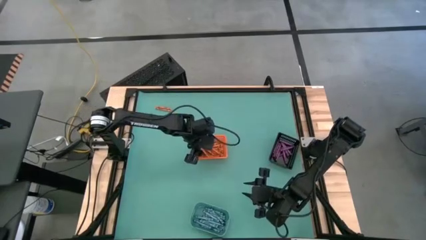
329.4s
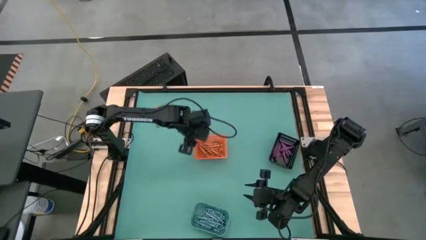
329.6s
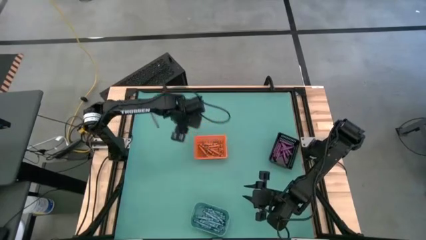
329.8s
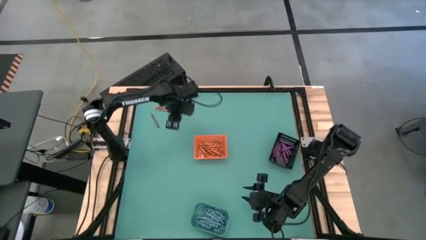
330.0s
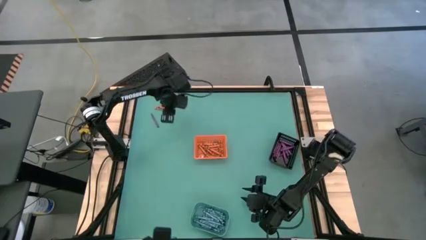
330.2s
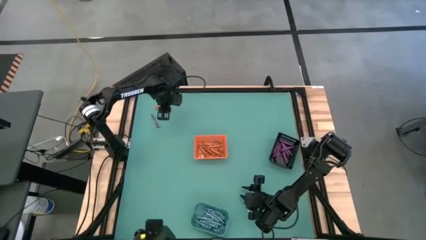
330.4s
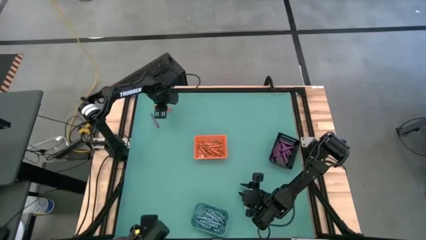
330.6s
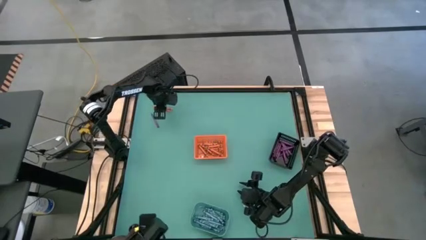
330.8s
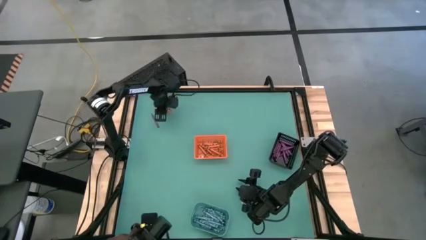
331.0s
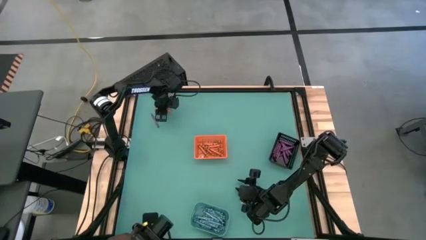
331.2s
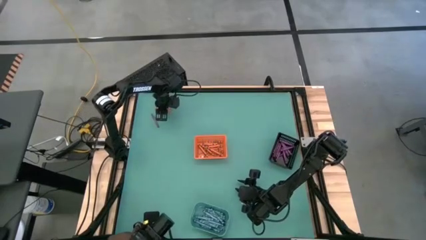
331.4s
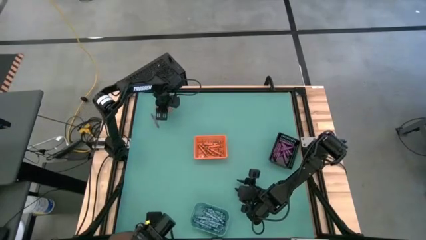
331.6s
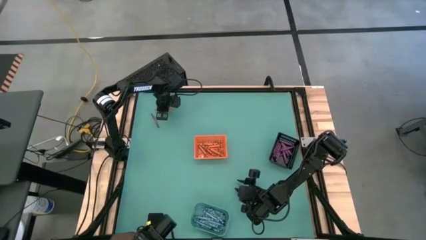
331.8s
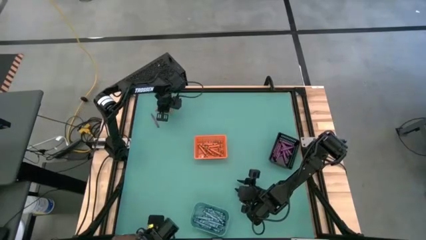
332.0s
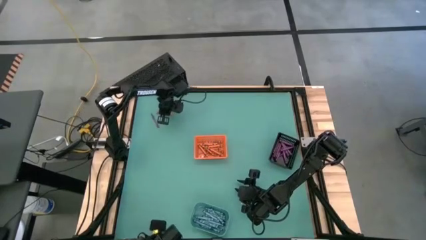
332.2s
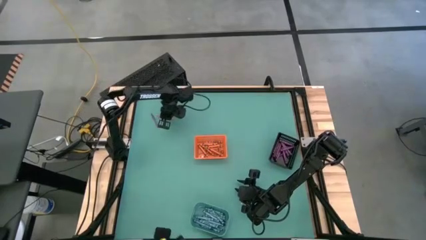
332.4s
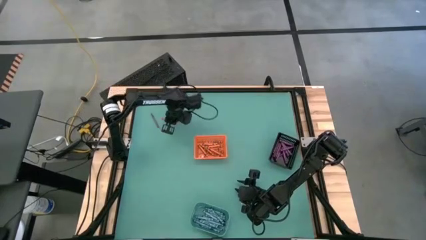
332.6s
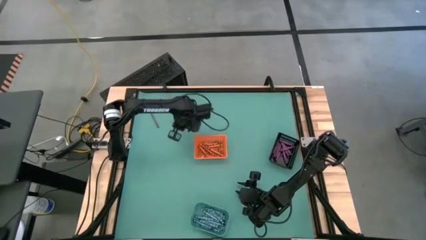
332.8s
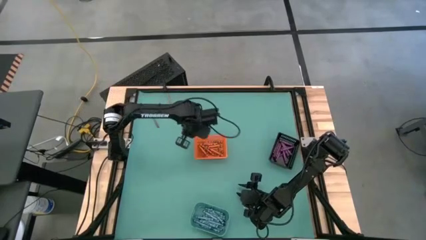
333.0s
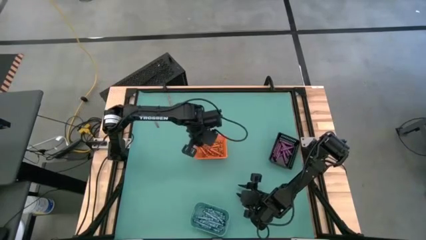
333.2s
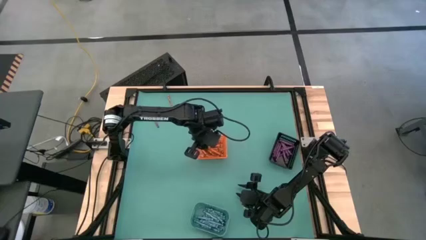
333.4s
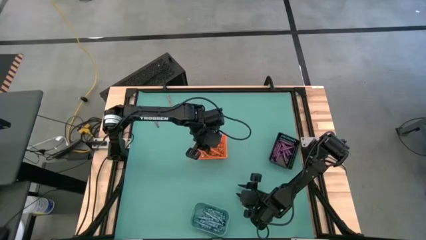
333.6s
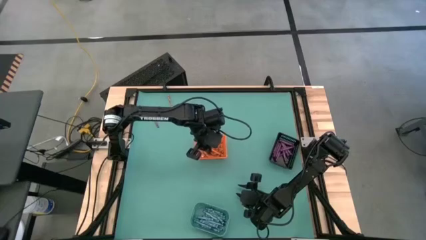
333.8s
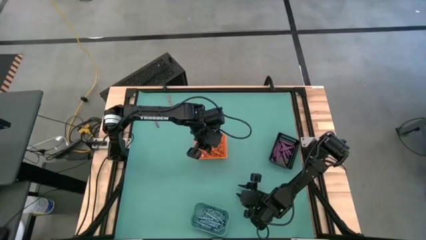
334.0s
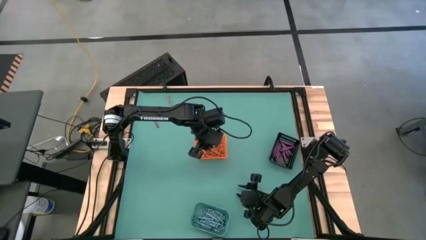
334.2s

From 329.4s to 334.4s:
Task: Sort crayons
Put the orange crayon into the orange bin

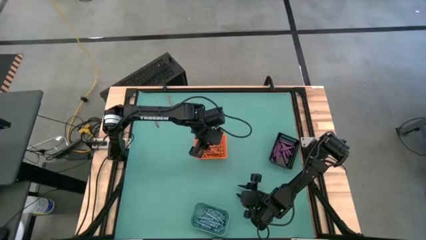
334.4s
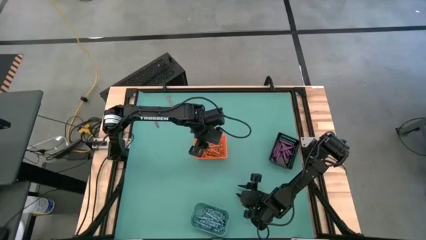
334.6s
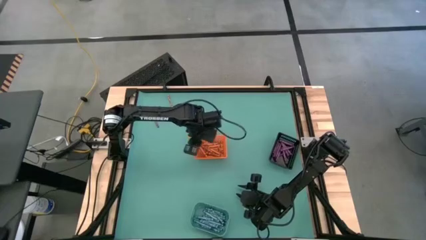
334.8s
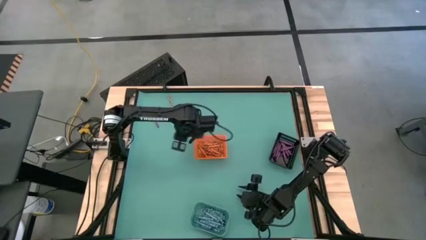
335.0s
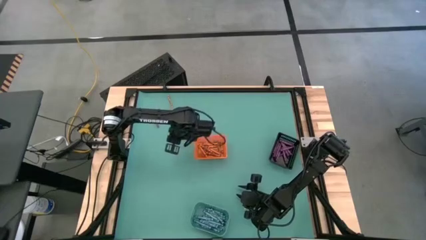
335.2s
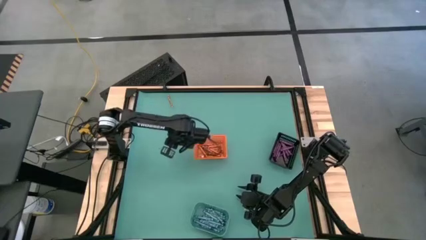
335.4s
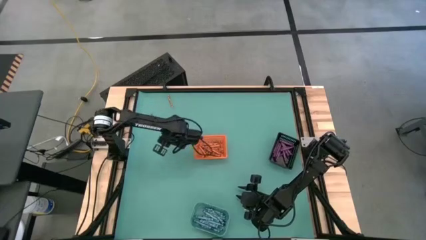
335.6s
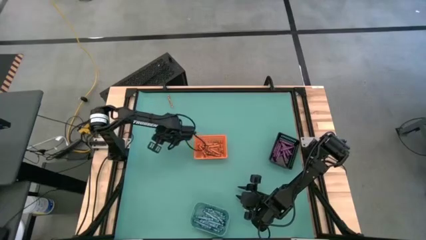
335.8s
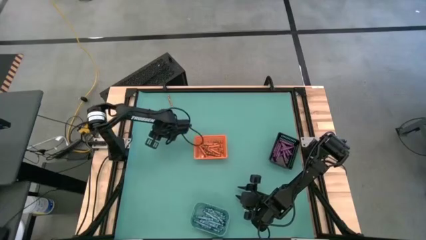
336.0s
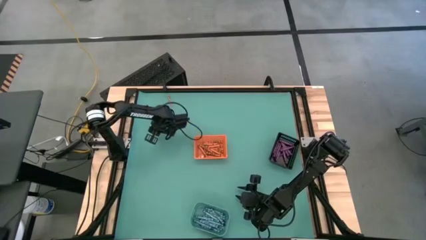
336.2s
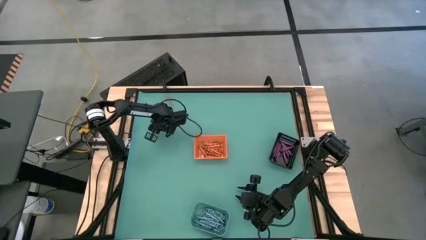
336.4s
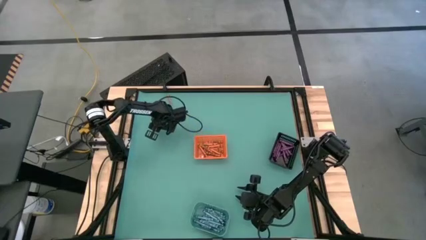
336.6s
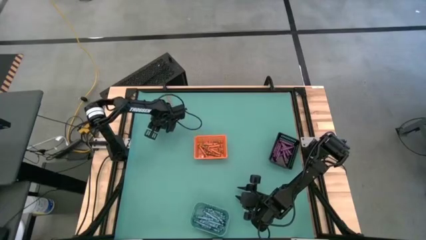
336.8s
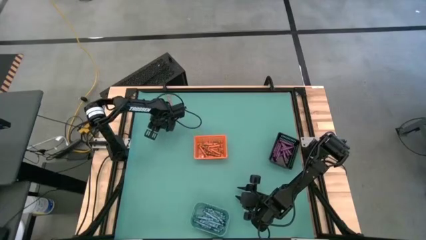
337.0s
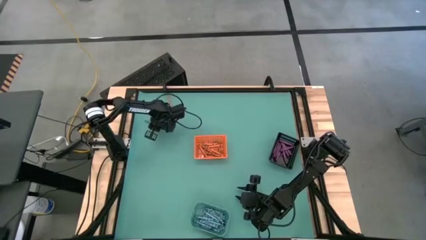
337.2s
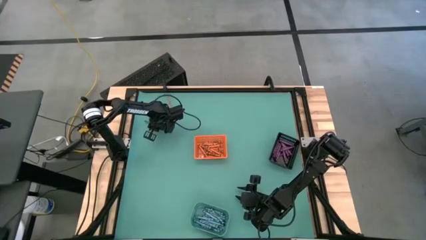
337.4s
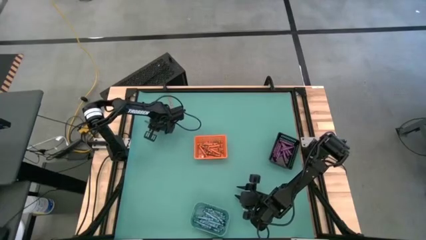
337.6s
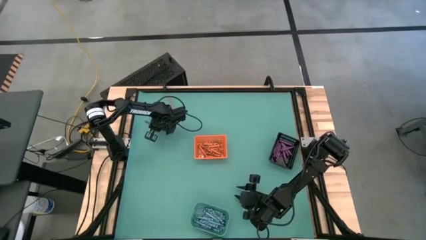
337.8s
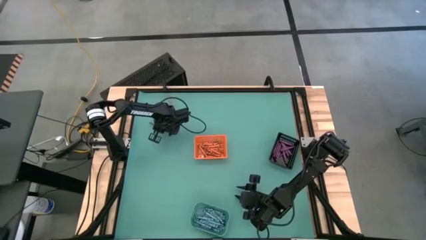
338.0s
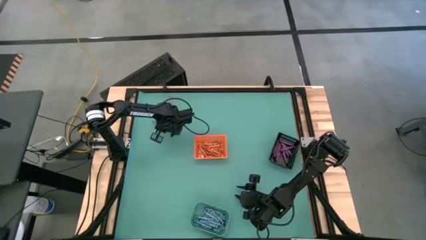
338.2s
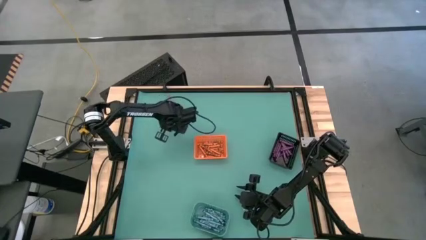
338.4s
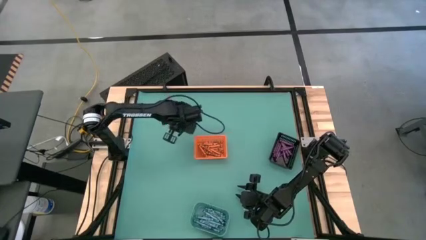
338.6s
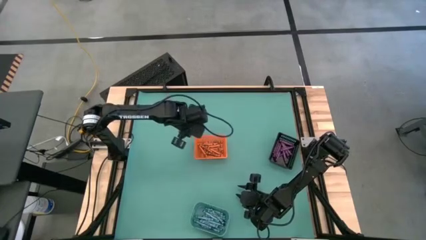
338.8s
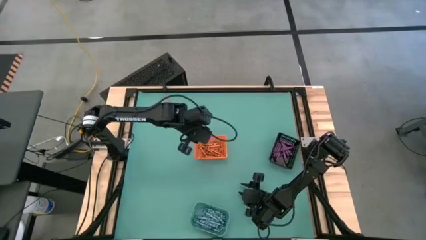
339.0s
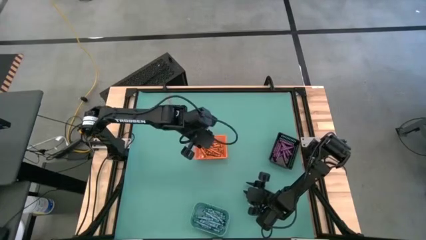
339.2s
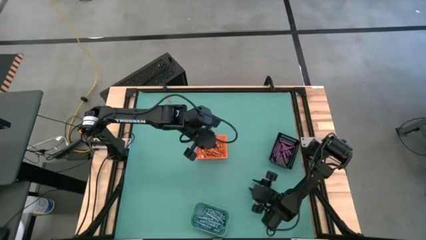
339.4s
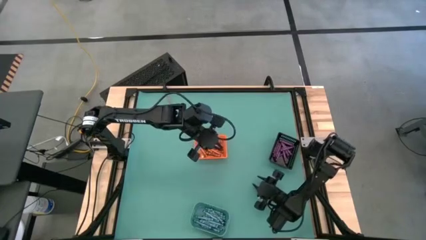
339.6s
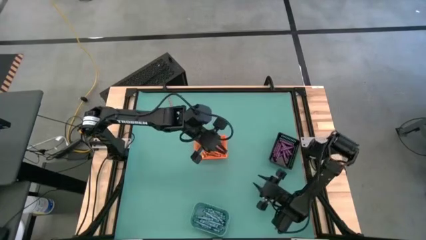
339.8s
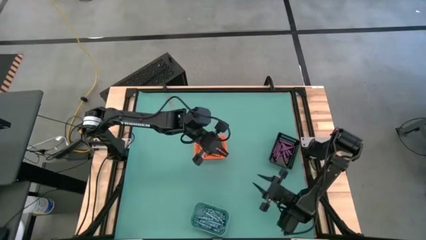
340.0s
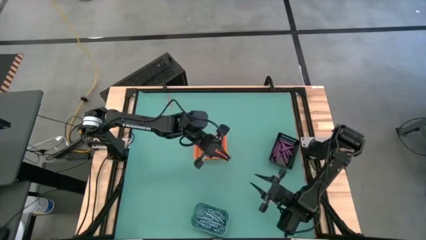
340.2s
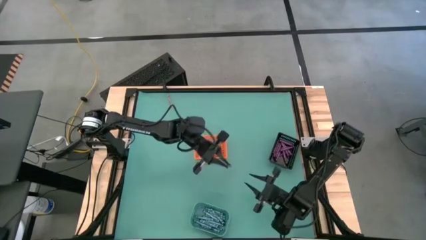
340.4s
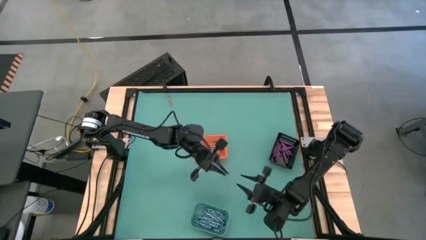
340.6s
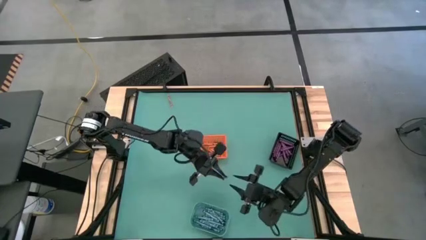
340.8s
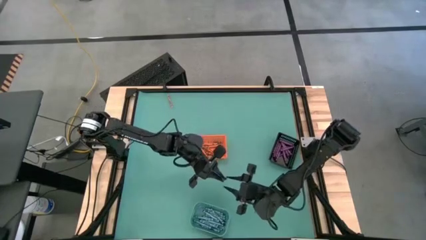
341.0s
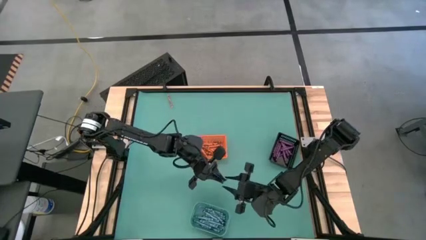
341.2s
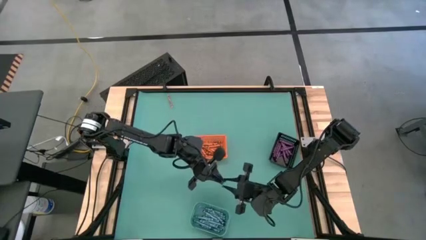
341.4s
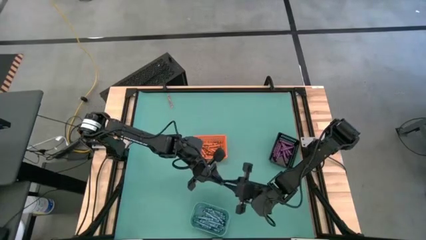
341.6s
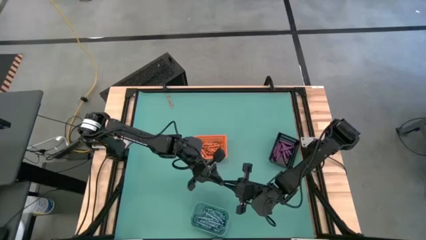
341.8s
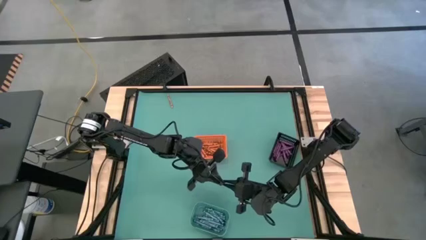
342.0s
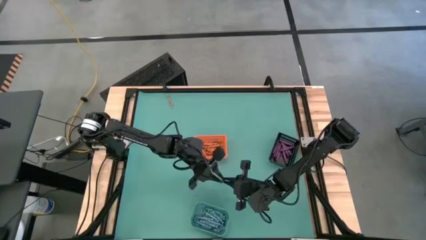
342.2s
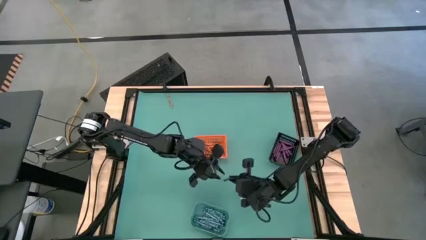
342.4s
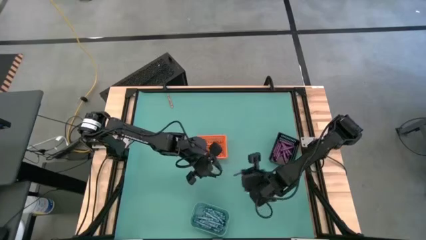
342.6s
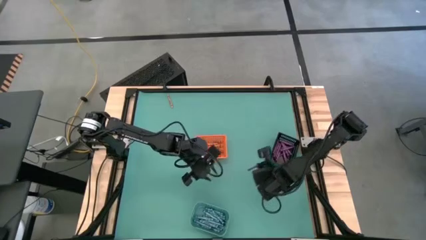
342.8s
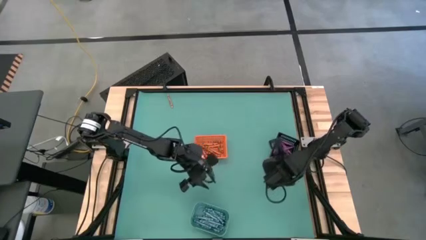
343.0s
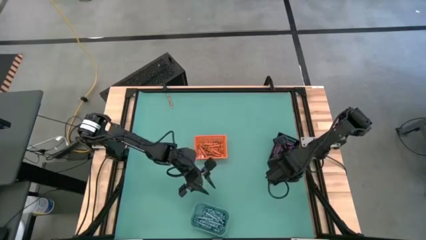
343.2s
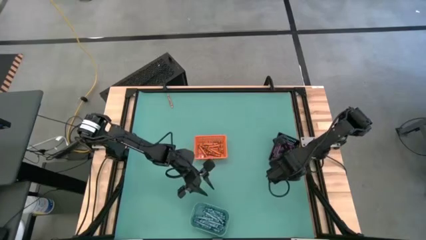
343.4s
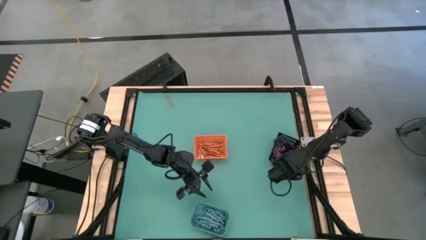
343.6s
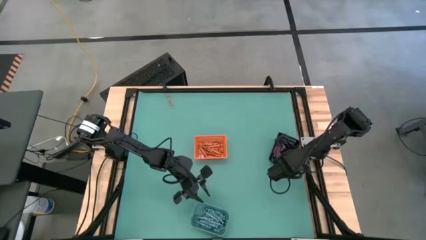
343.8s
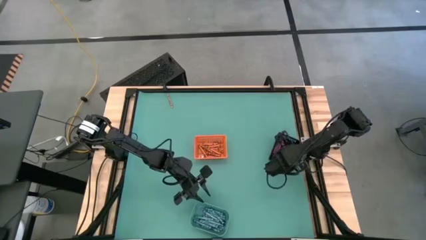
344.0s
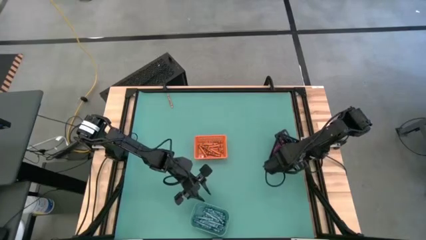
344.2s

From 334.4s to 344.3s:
Put the purple crayon into the black bin
